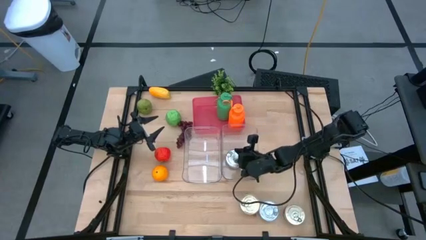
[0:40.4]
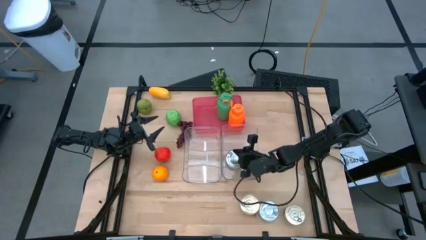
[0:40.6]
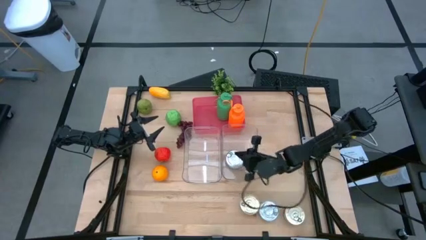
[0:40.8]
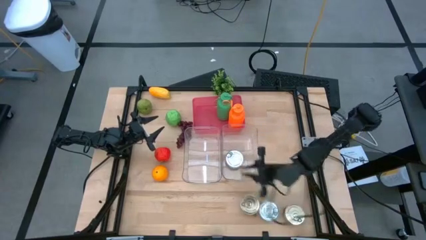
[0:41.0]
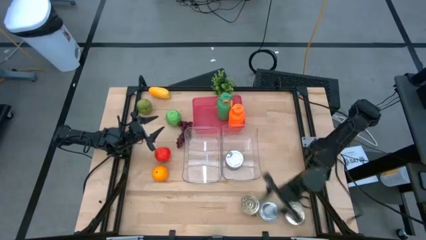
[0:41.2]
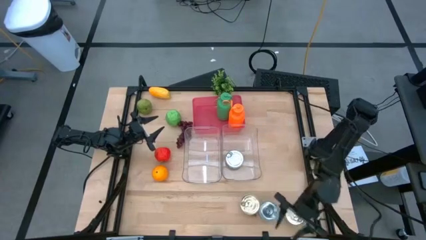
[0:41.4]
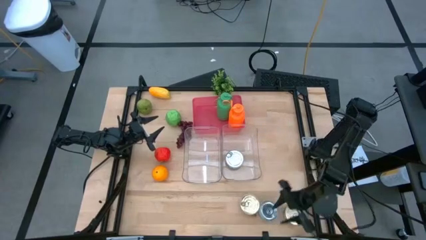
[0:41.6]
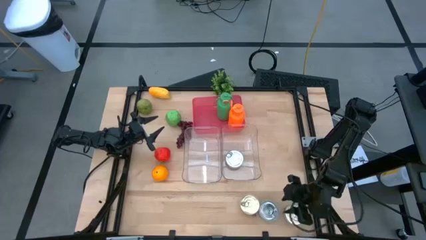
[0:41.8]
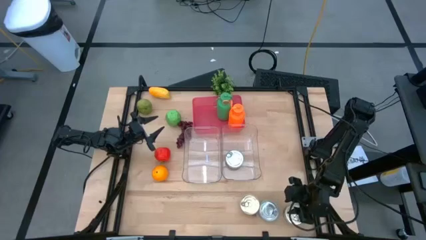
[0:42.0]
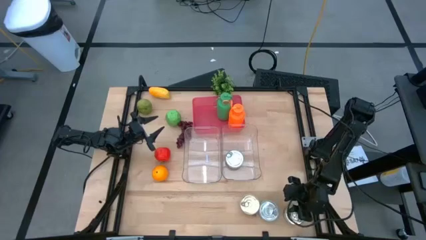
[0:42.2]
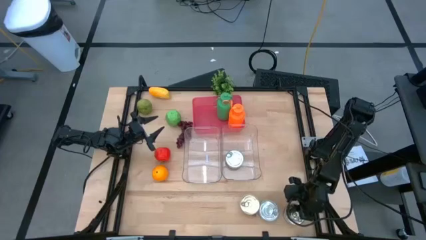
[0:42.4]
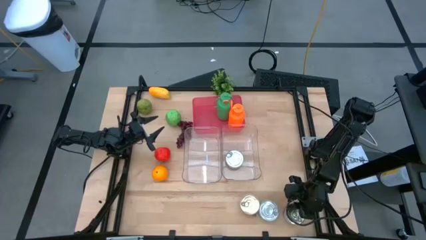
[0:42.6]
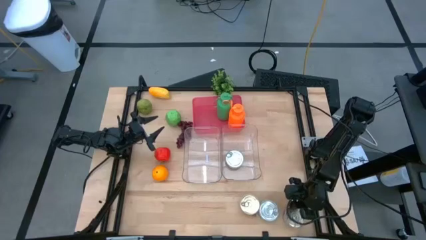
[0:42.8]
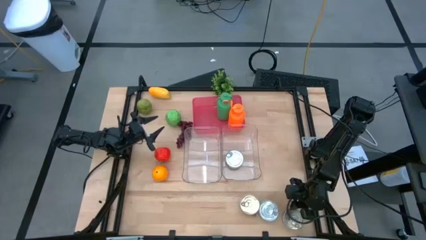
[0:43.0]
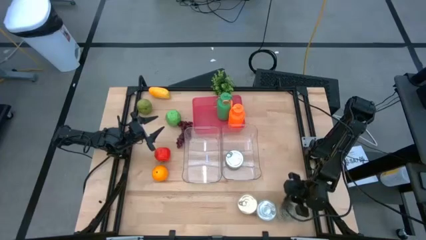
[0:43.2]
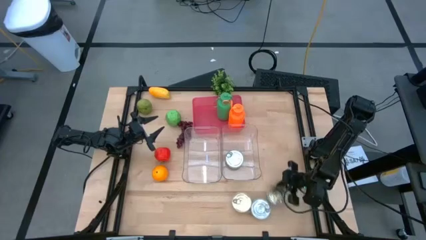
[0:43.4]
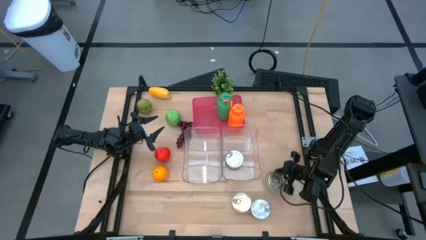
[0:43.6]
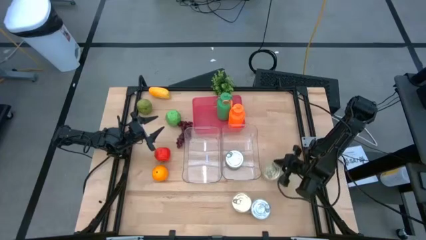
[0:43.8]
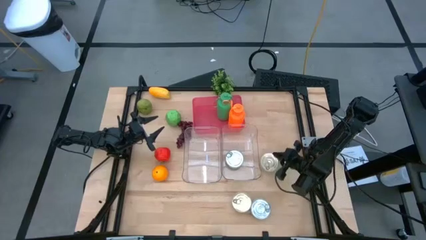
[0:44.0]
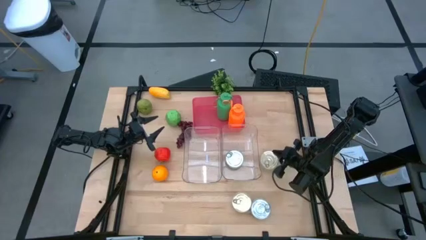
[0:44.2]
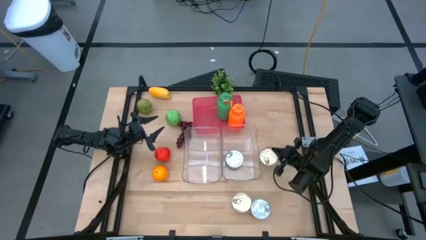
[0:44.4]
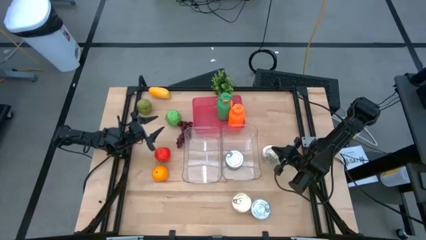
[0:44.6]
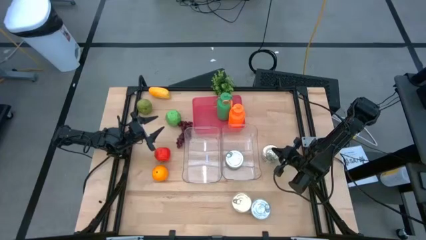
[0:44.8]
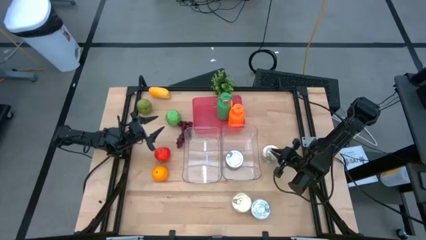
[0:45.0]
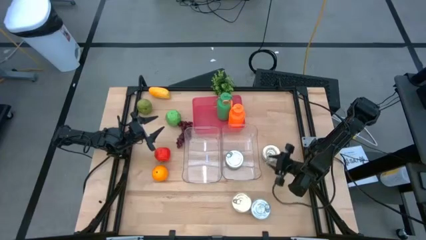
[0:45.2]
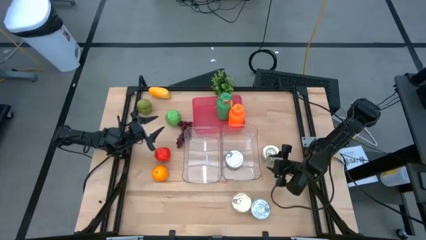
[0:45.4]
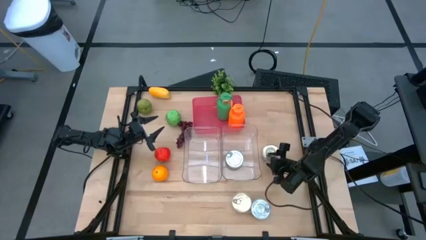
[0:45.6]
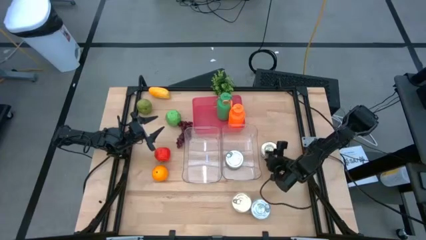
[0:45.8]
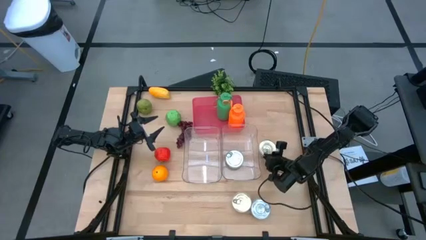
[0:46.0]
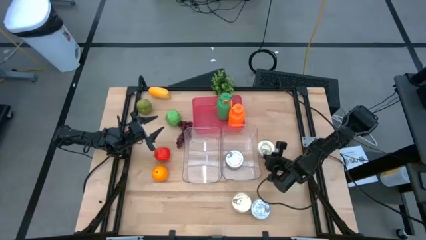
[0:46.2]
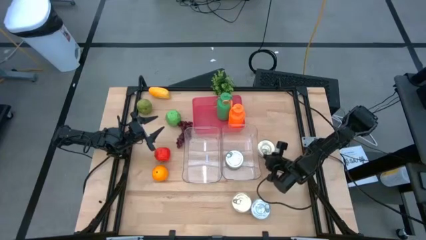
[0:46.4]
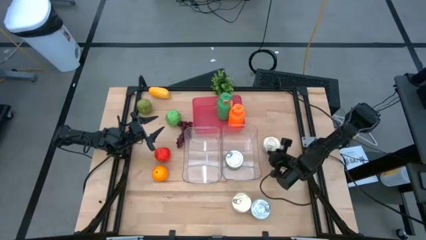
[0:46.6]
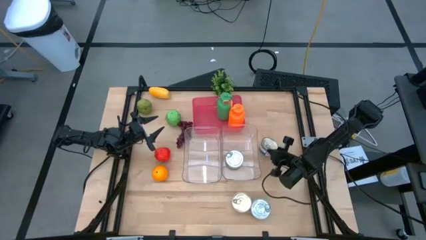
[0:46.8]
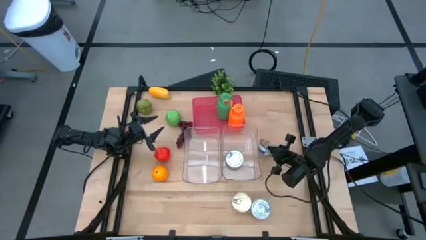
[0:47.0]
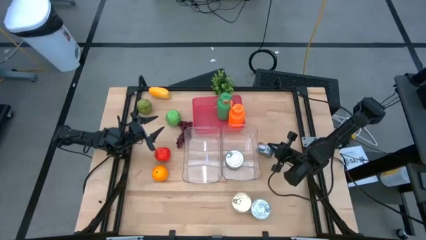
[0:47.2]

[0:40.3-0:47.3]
Task: Pick & Place Food Item
Put the right blue and pink tuna can into the right transparent bin

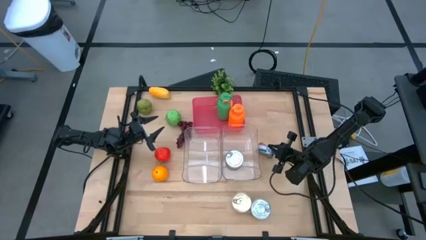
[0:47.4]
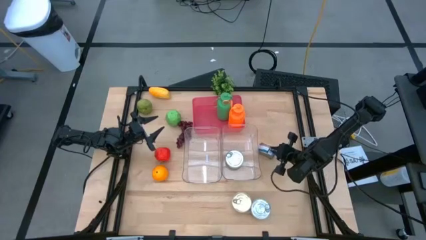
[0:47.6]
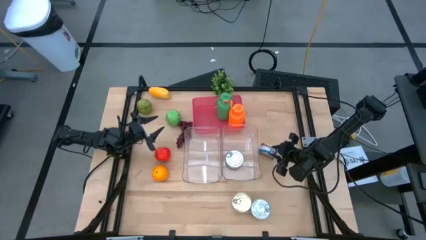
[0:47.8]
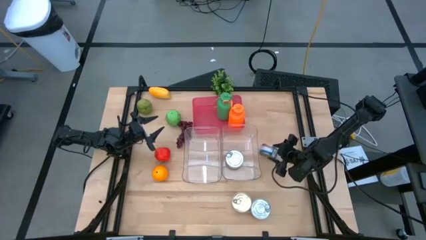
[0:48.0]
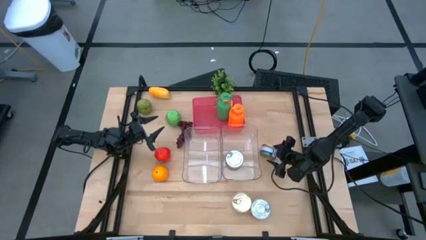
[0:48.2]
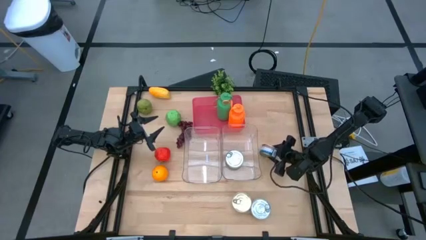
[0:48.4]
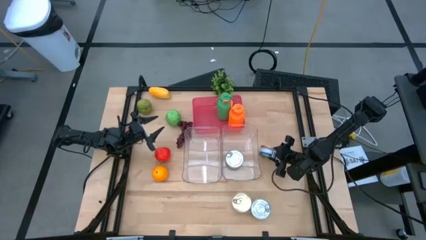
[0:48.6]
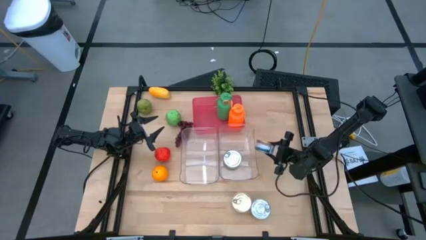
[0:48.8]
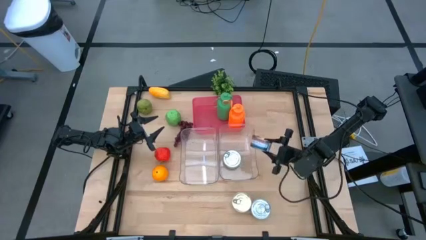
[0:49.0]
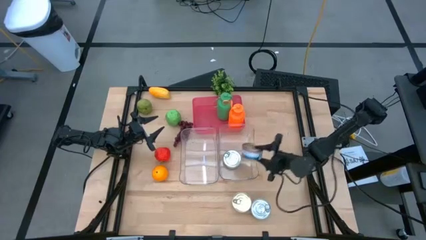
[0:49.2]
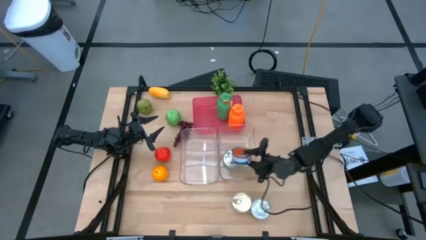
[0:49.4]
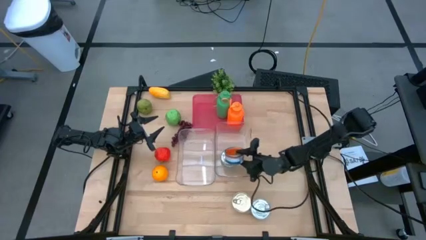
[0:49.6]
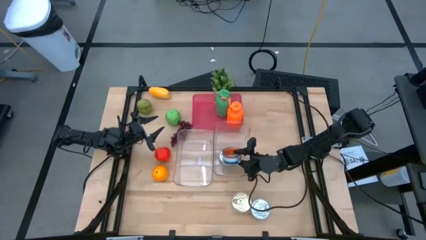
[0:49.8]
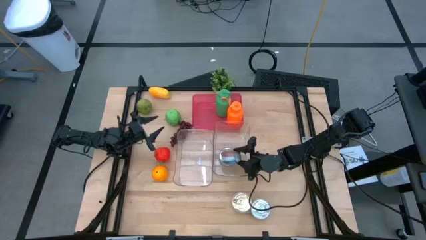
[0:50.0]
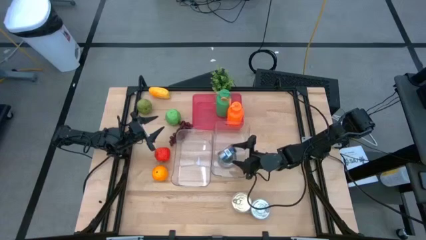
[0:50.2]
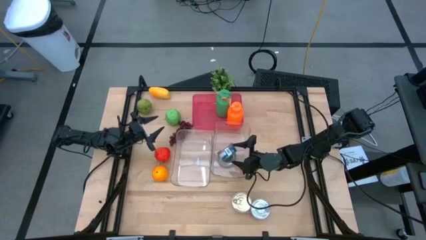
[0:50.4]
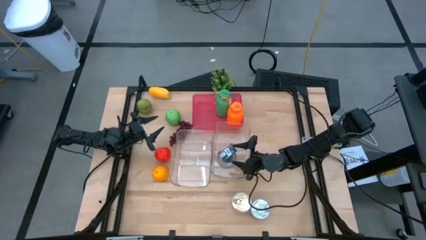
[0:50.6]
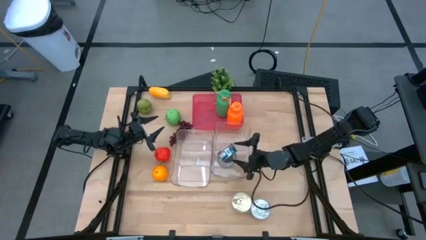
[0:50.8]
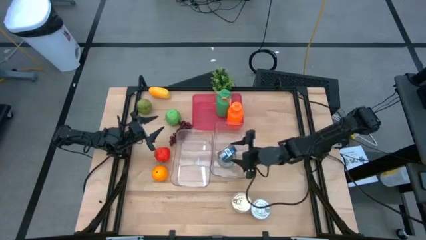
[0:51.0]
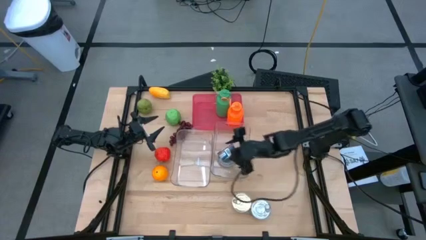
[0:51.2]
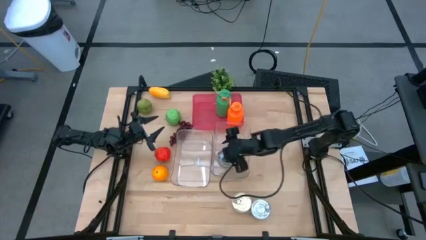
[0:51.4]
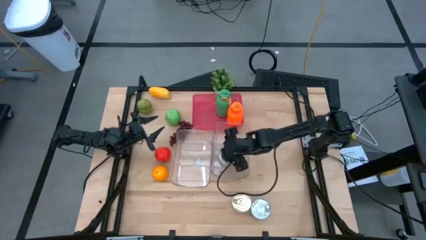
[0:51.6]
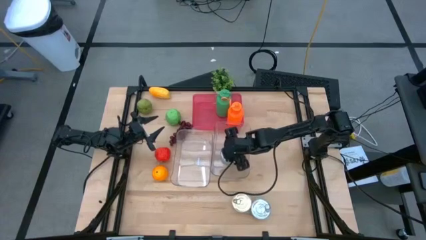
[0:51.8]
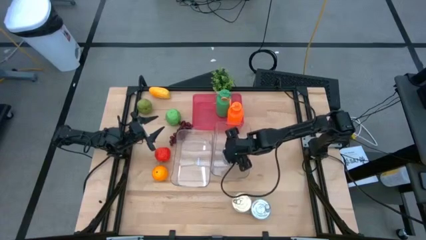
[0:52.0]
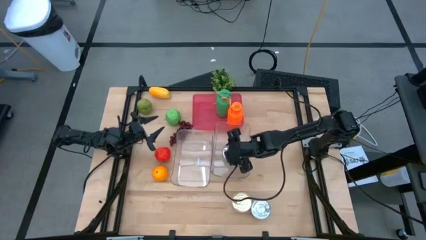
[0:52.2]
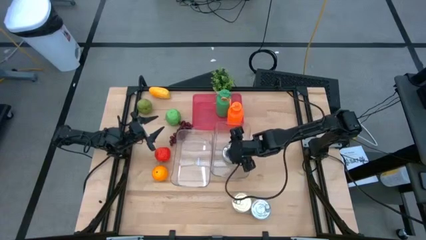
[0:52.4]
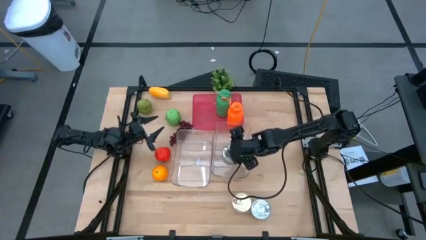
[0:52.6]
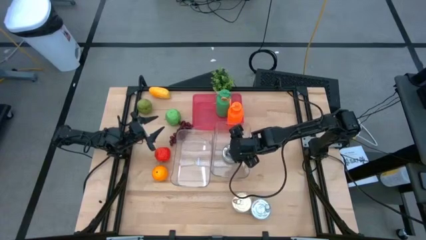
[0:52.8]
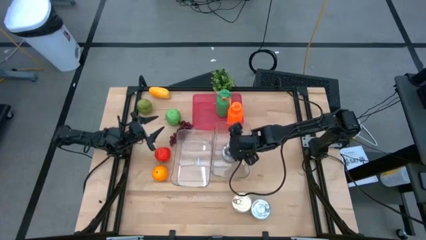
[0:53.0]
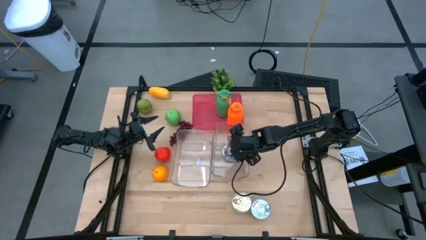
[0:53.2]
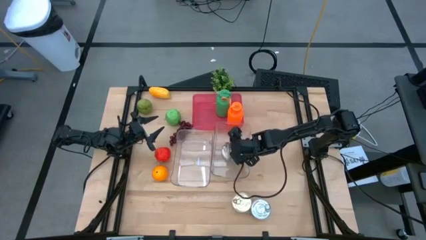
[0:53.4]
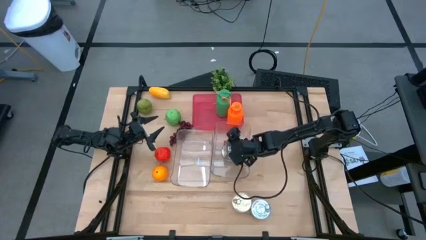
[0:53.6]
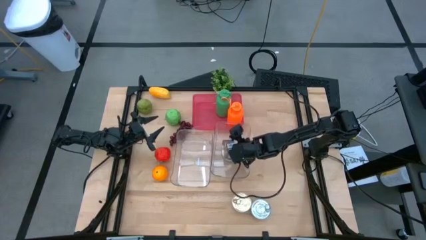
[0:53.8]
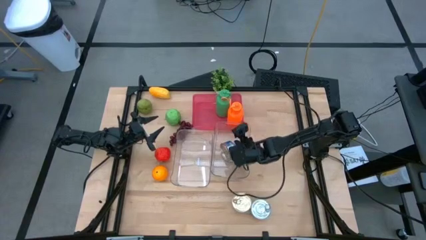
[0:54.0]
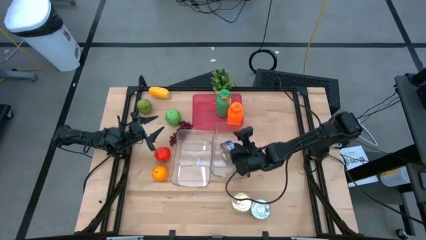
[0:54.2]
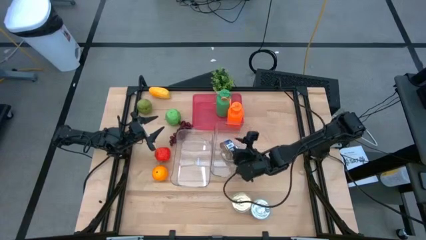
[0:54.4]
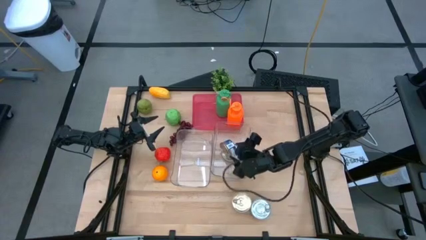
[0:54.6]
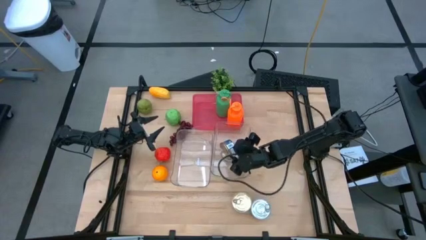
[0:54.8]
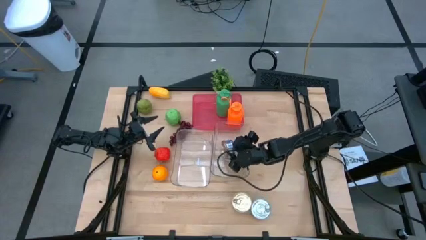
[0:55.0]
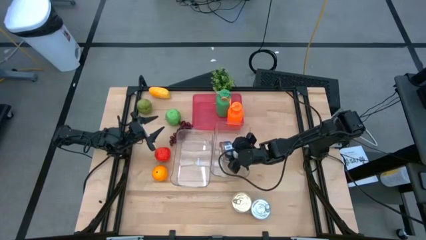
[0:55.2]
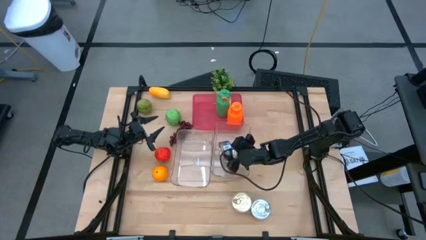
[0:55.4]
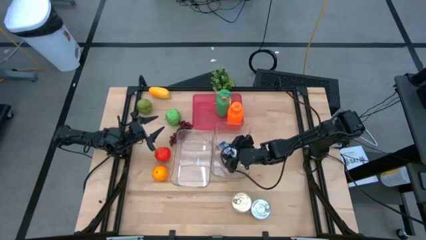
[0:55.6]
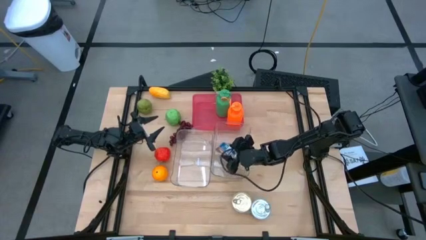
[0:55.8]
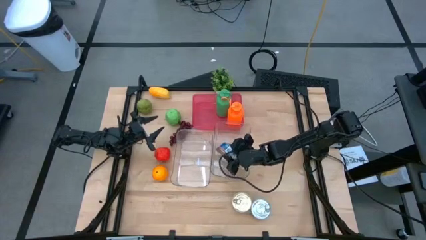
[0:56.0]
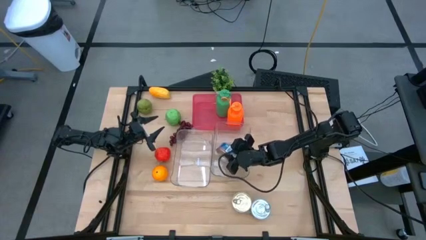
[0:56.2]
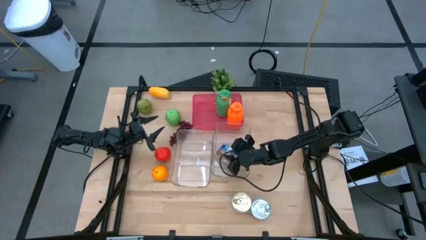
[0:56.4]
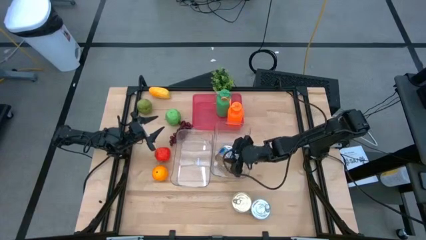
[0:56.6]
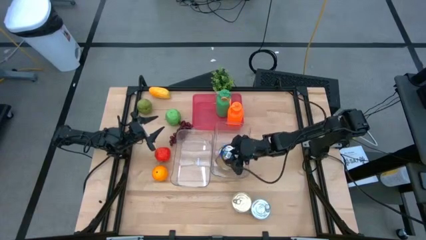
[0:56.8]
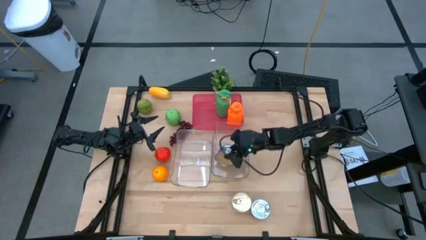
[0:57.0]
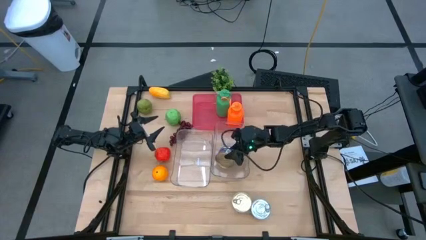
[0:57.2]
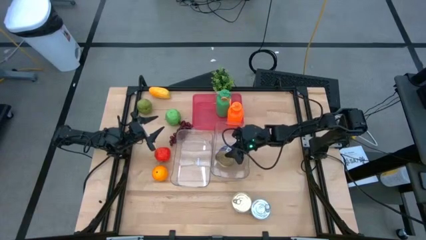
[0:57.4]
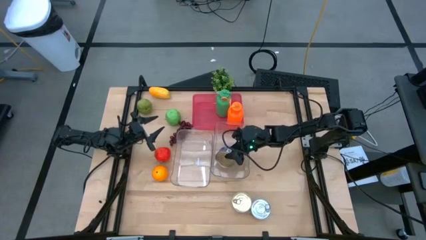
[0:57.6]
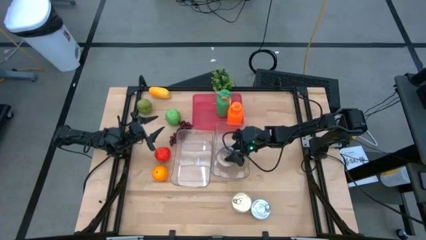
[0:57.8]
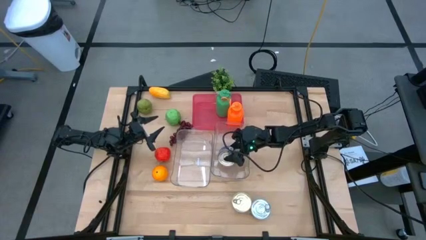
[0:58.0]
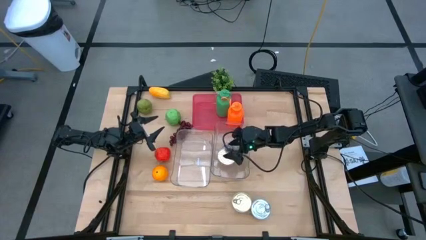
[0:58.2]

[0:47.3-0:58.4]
Put the right blue and pink tuna can into the right transparent bin
